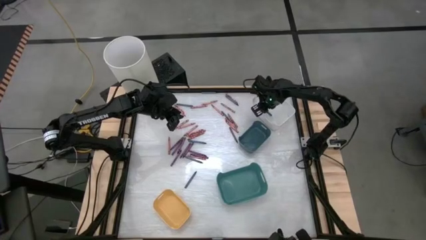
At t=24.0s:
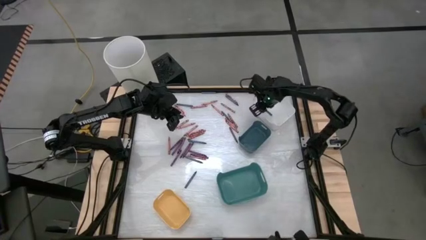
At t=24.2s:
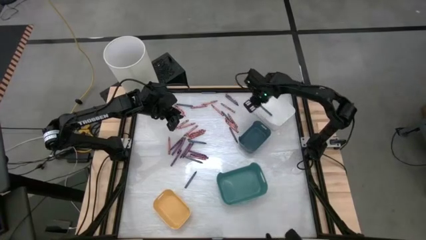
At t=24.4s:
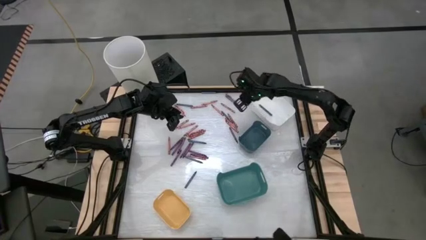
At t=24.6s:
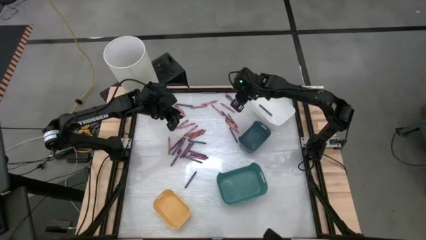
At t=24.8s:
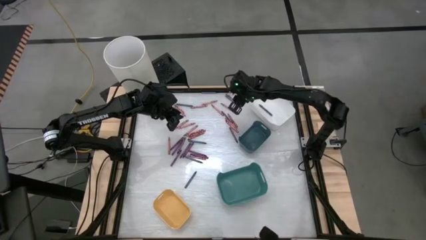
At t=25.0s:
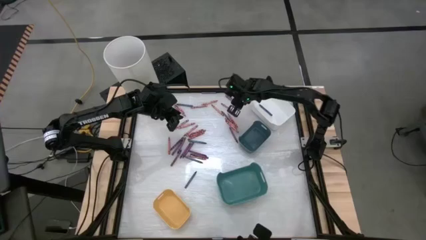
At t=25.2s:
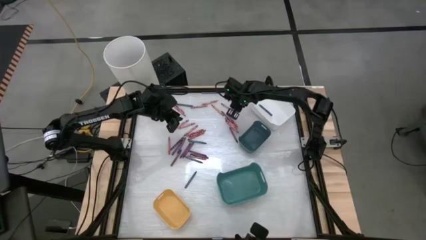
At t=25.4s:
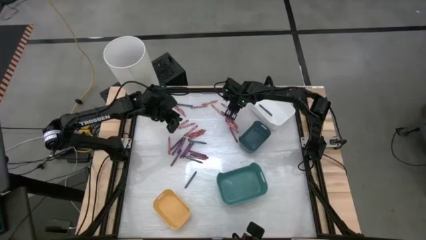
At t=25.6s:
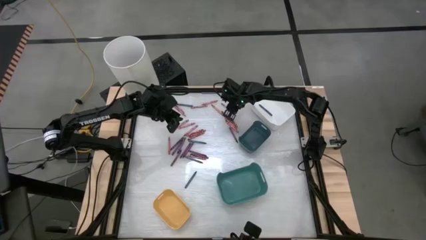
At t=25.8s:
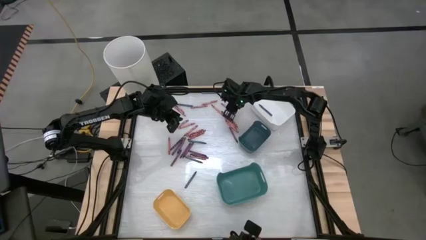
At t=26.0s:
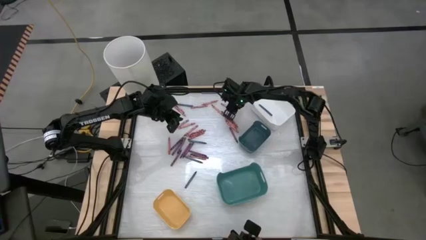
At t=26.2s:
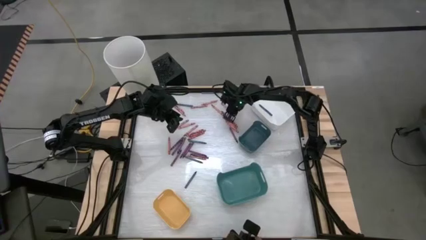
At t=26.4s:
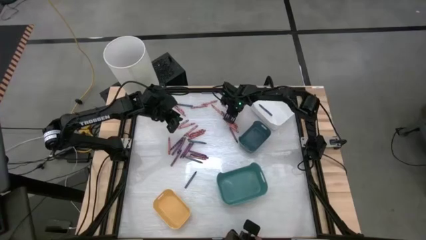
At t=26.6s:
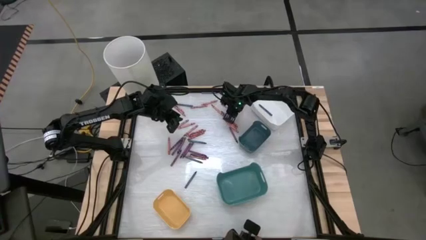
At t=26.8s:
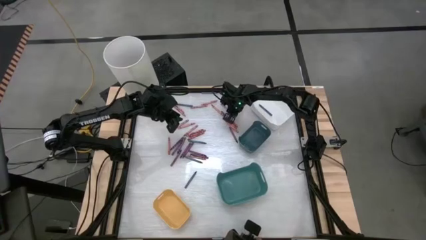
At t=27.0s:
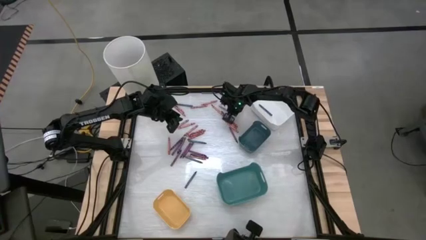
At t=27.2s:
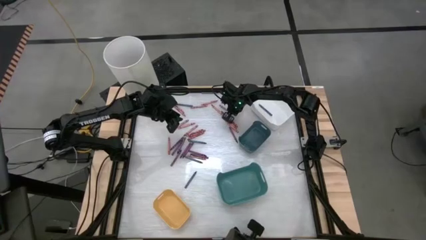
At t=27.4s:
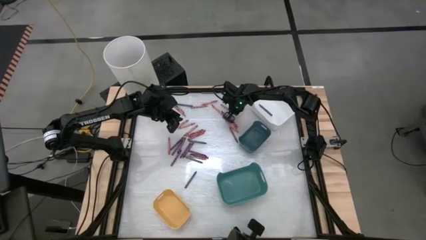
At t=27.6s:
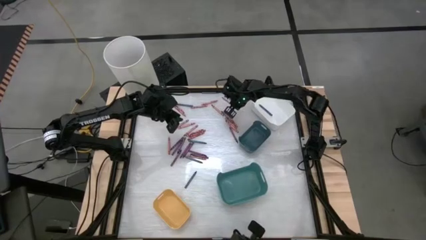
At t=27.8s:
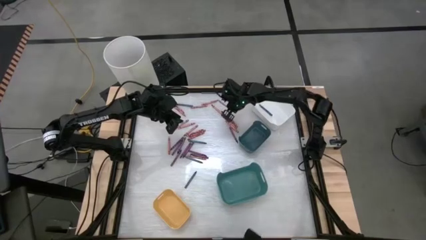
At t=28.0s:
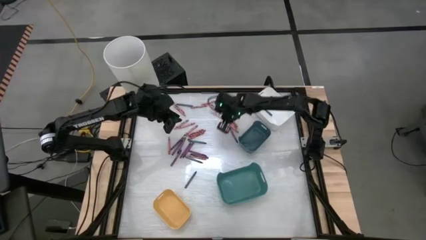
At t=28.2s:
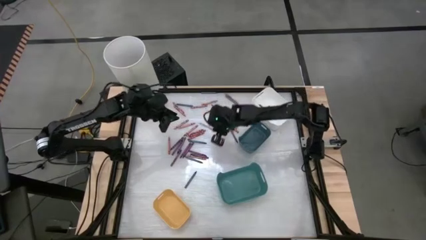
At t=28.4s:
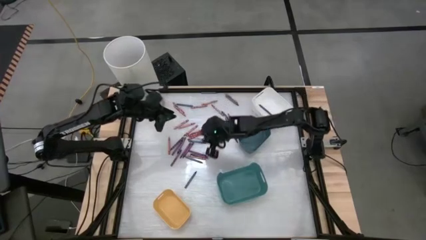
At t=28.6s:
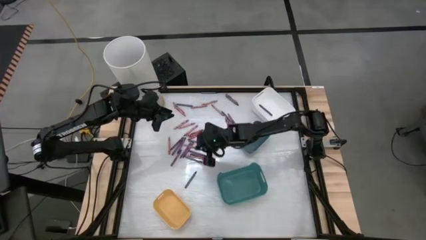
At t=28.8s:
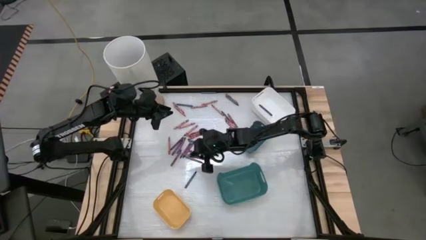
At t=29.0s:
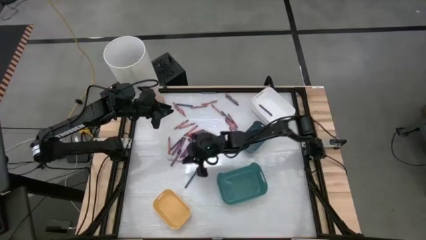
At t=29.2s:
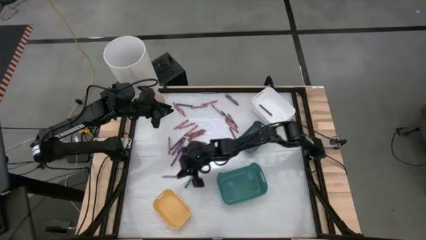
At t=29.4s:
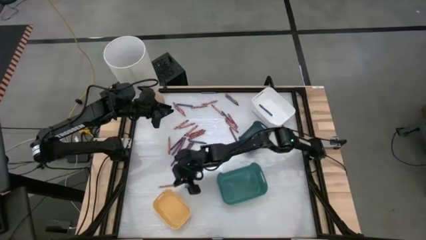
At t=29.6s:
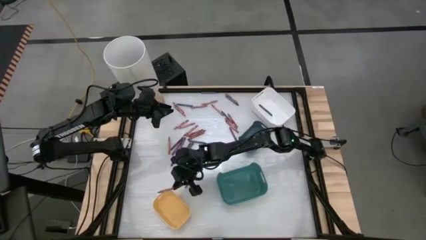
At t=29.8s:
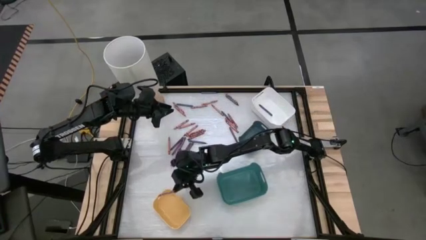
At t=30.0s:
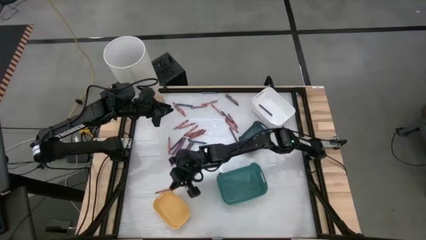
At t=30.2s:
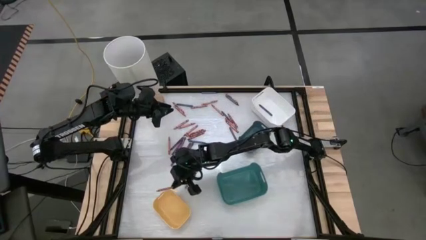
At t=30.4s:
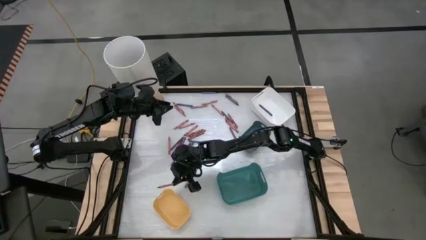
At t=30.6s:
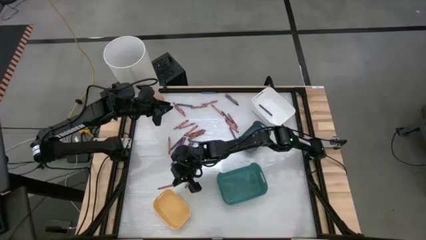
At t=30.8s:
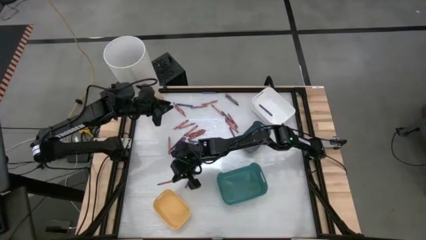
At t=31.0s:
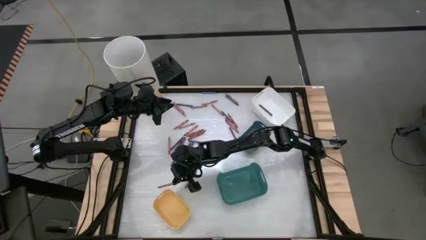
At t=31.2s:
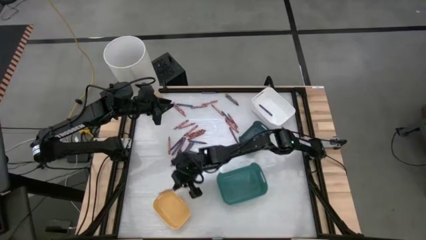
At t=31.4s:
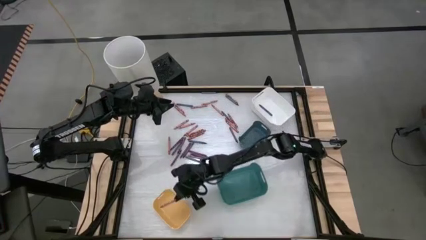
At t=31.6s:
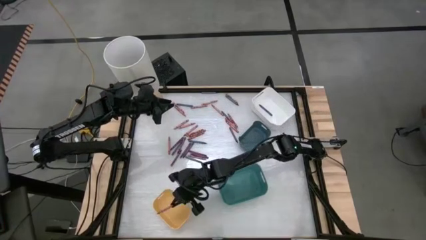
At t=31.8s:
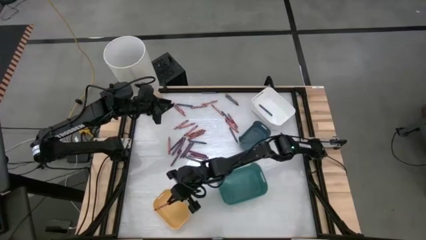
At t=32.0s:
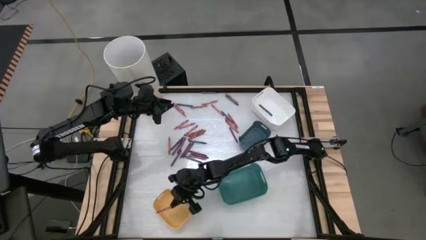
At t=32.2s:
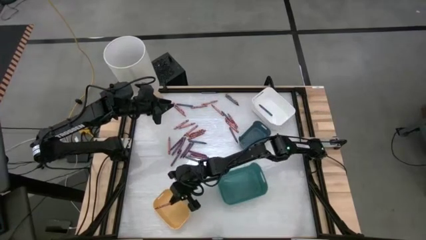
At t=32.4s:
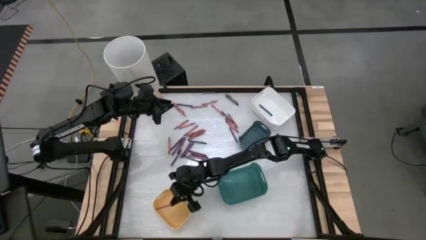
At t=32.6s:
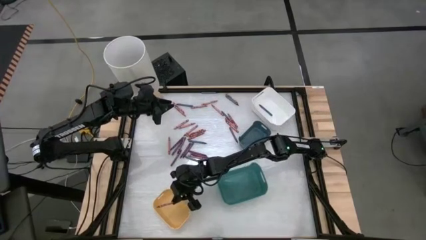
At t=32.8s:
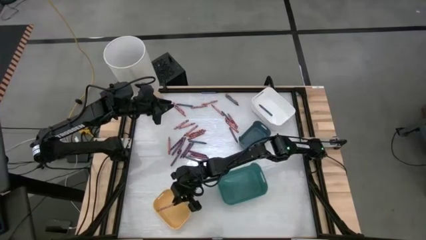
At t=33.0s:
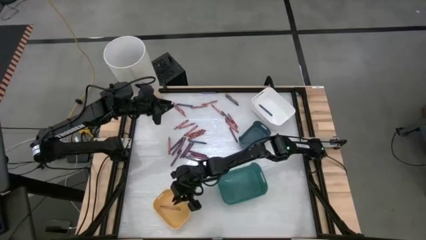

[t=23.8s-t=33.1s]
Task: Sort crayons
Put the red crayon into the yellow bin

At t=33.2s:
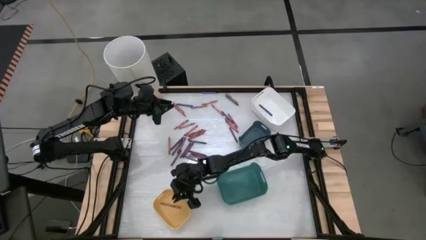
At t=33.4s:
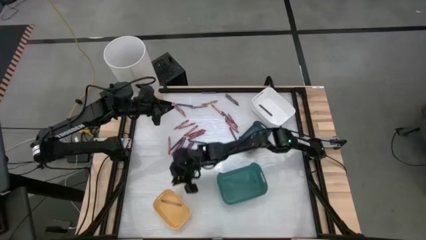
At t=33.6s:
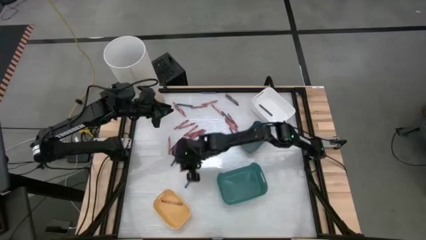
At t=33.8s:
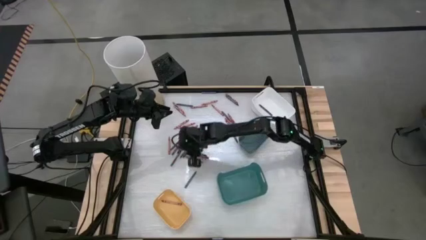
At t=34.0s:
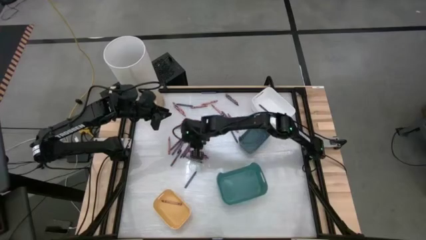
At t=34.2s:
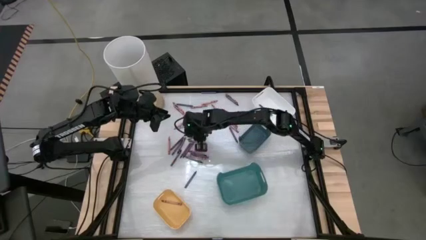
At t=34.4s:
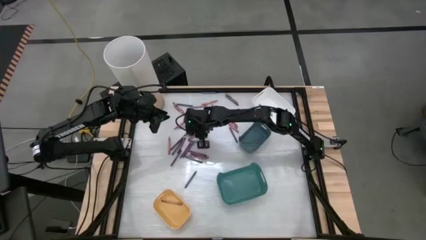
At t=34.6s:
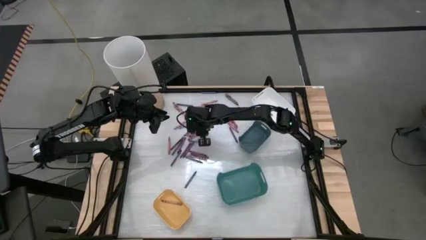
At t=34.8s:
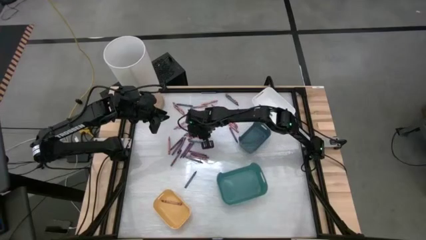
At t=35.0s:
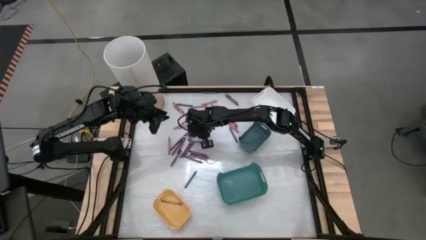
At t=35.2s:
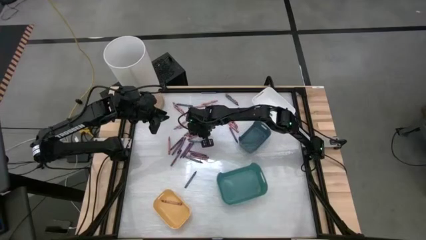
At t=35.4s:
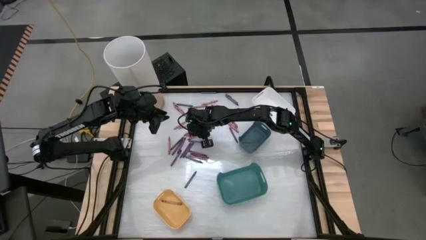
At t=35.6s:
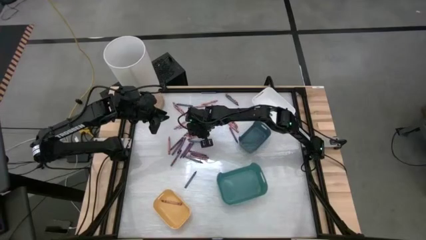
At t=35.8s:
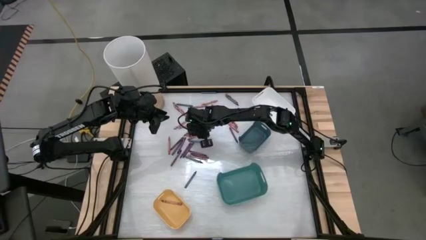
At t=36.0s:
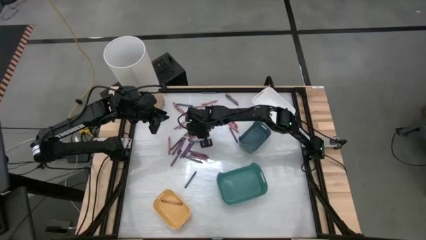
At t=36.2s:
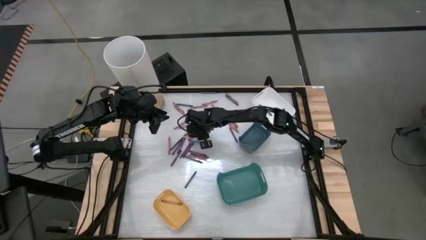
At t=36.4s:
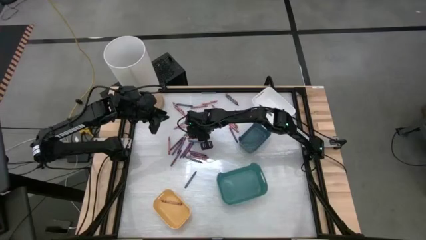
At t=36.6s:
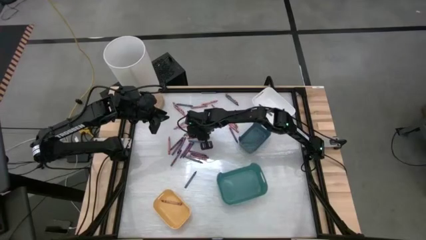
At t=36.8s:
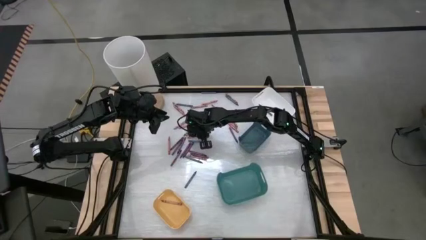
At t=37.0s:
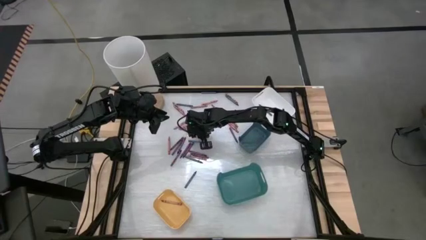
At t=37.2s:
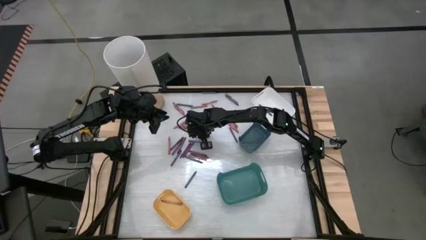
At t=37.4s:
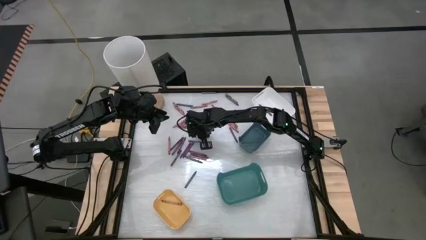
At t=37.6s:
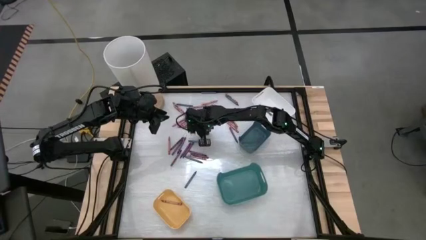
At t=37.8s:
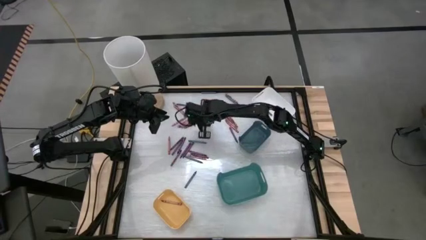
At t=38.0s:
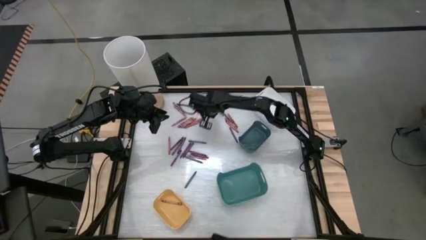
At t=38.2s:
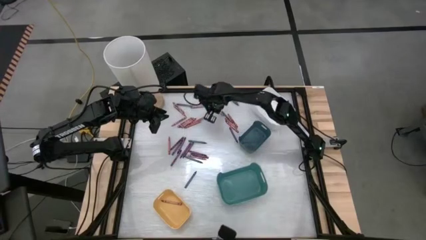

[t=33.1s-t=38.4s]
Put the red crayon into the yellow bin

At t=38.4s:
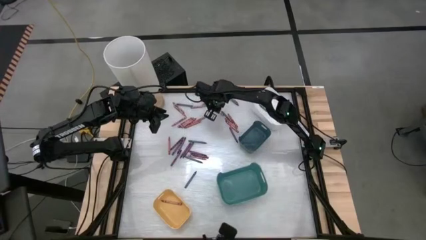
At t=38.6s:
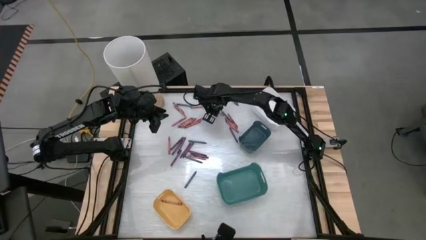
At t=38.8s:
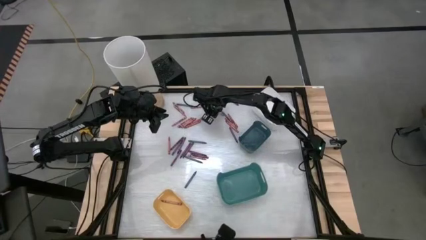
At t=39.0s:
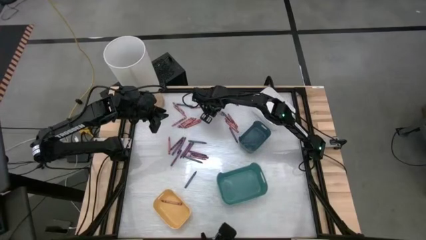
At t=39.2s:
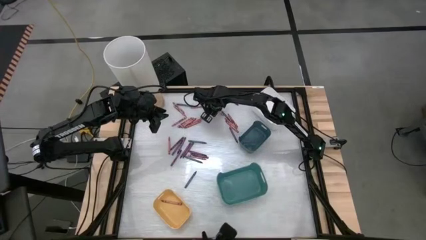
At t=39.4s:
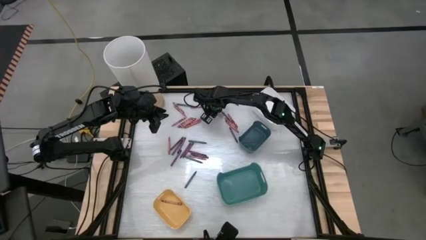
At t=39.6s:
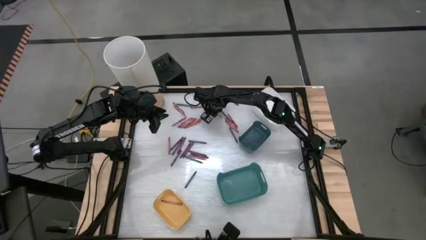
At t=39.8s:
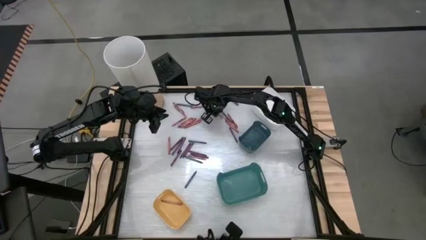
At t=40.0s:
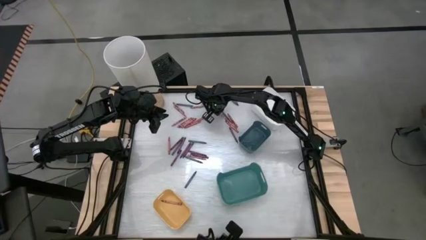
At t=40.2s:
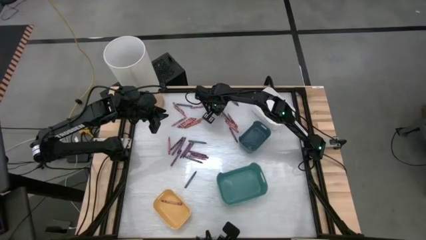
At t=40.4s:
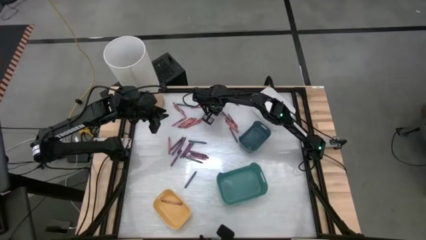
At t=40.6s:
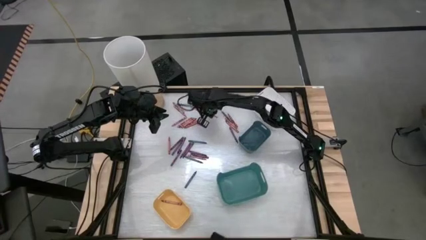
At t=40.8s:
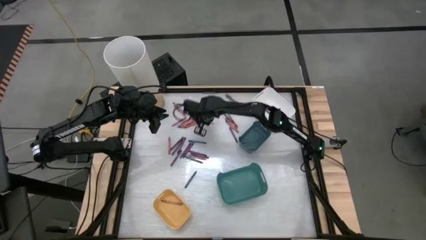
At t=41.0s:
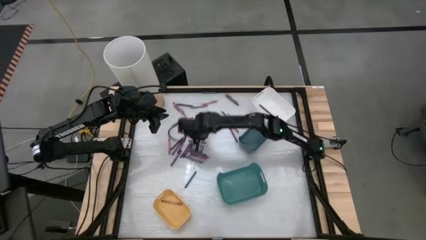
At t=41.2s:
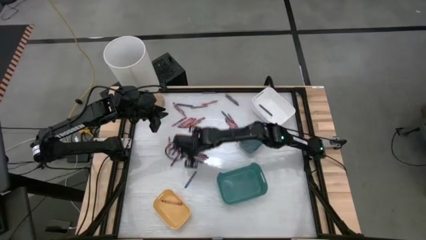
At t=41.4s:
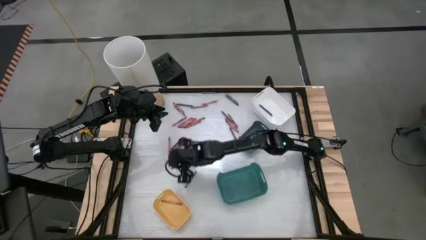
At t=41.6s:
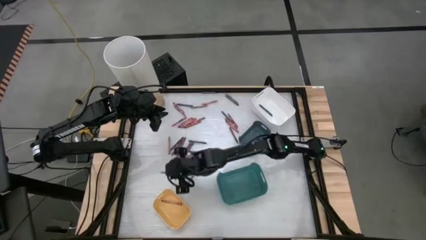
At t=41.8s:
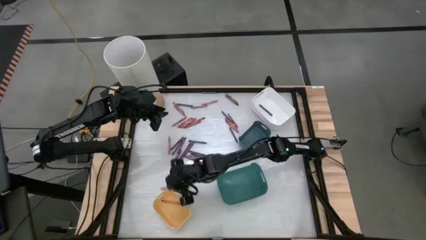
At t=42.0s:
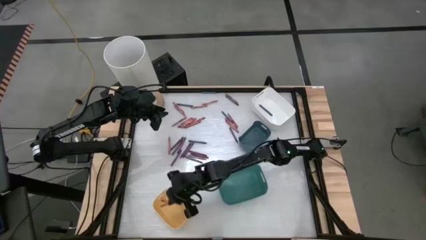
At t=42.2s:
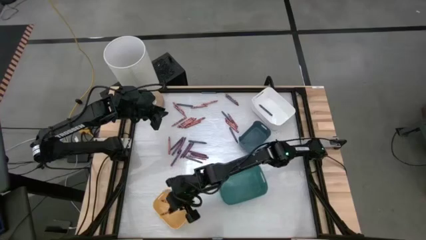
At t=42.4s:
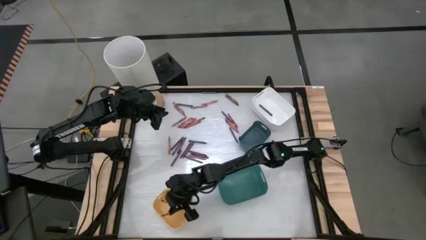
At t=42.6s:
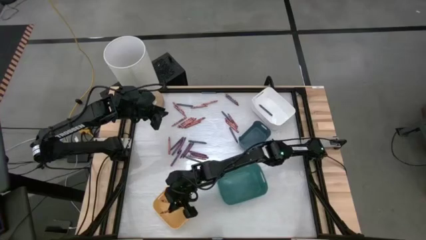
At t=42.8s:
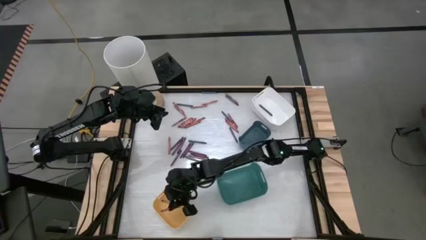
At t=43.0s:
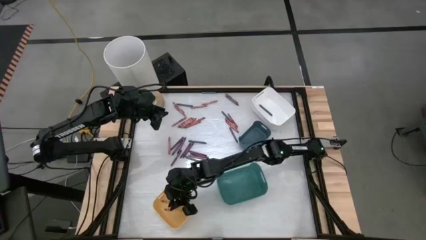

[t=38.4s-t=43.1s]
Put the red crayon into the yellow bin
